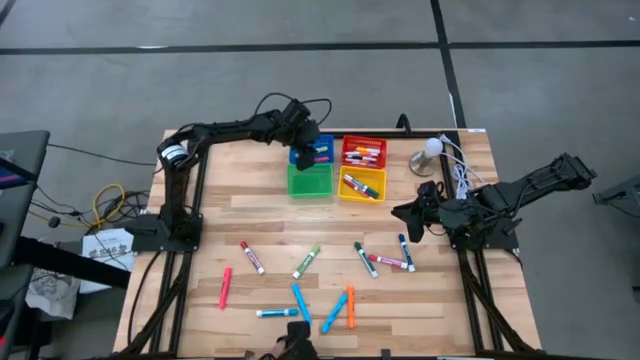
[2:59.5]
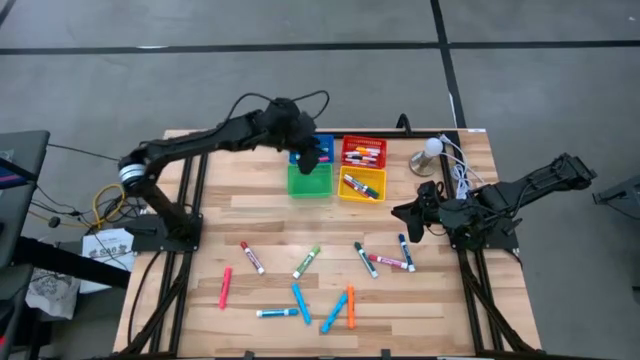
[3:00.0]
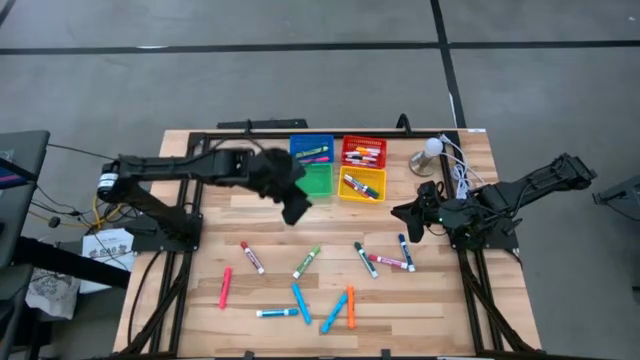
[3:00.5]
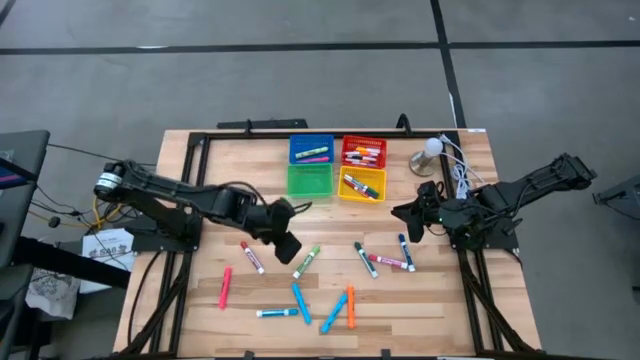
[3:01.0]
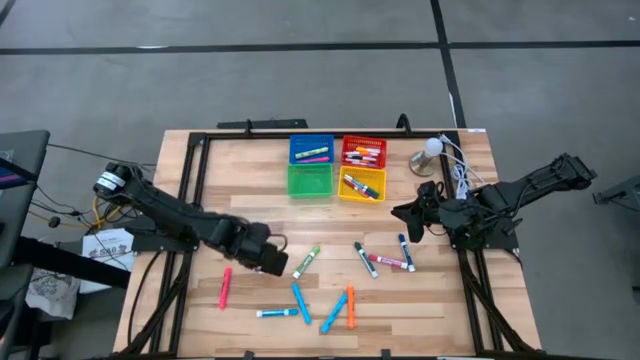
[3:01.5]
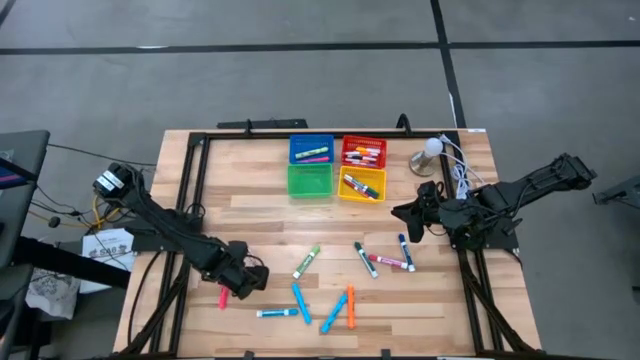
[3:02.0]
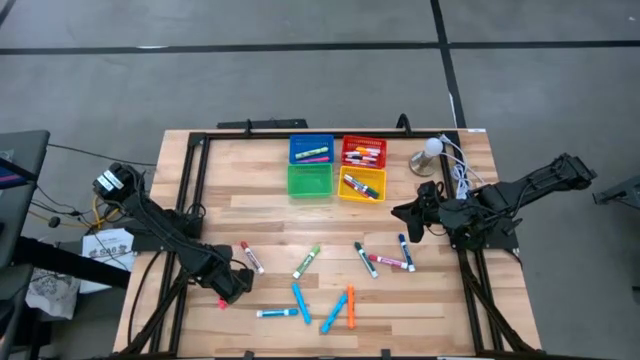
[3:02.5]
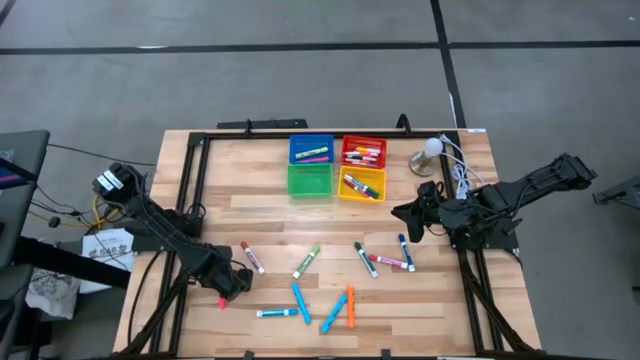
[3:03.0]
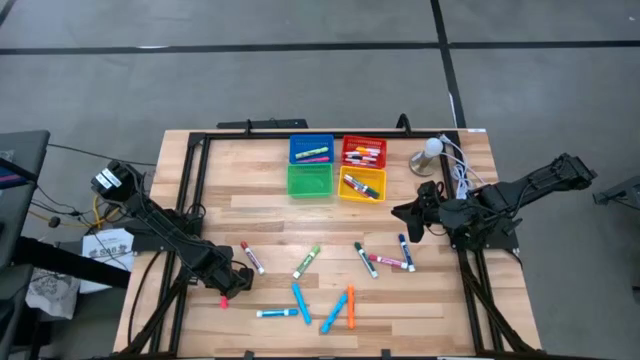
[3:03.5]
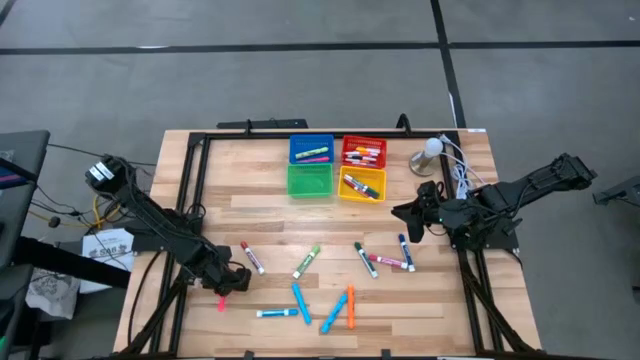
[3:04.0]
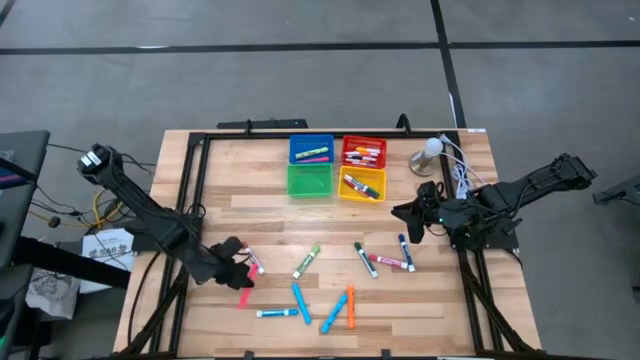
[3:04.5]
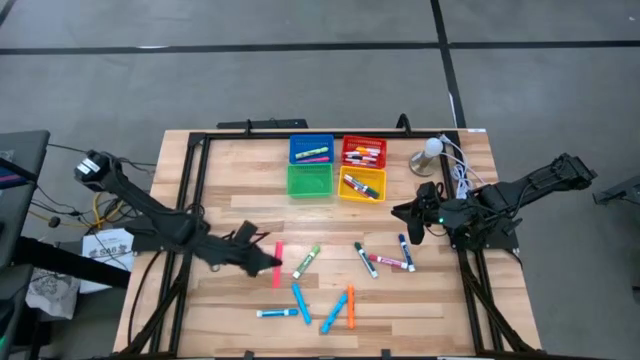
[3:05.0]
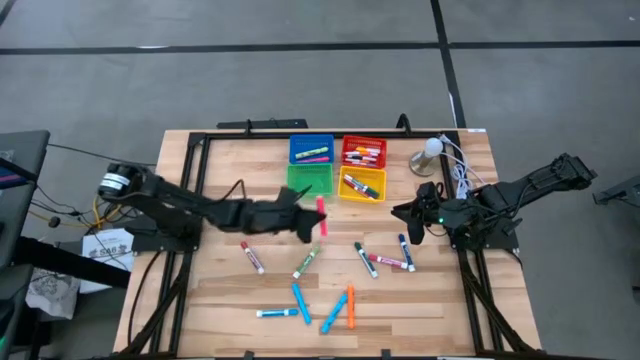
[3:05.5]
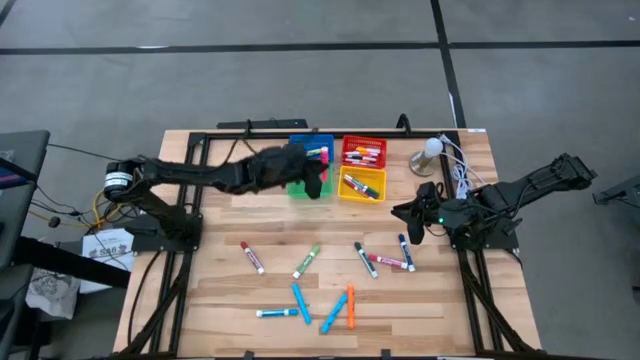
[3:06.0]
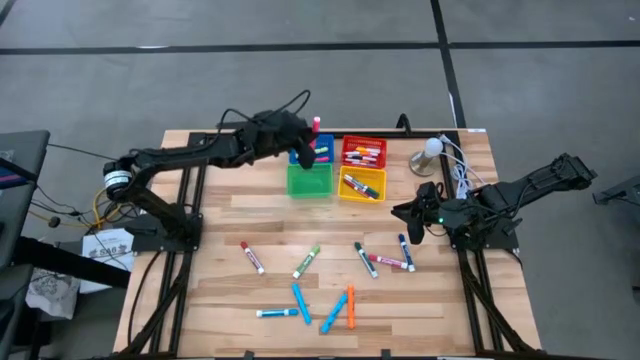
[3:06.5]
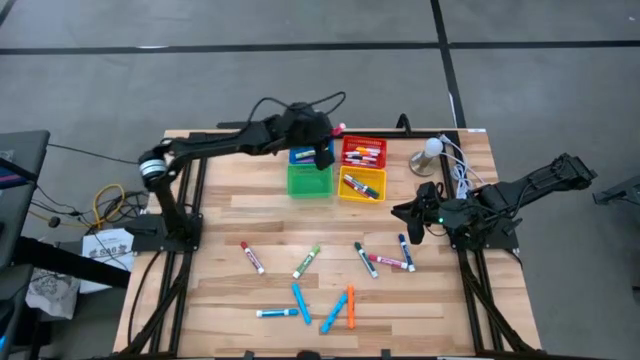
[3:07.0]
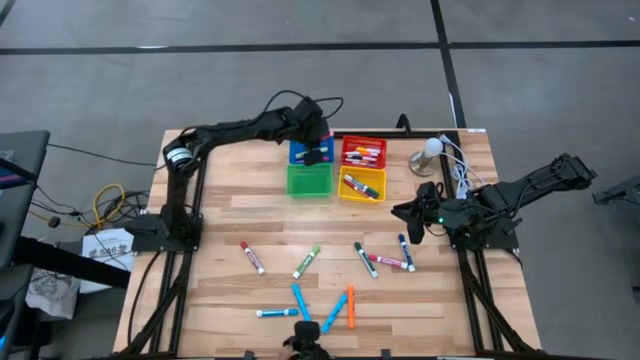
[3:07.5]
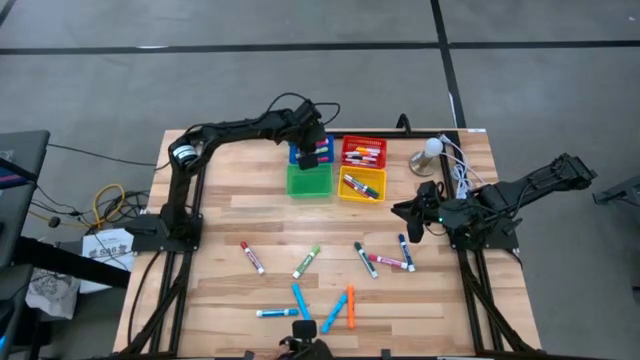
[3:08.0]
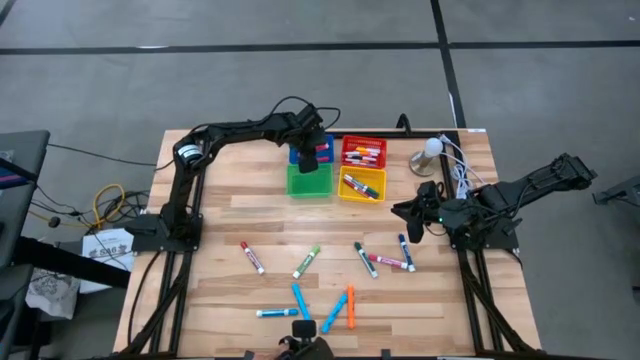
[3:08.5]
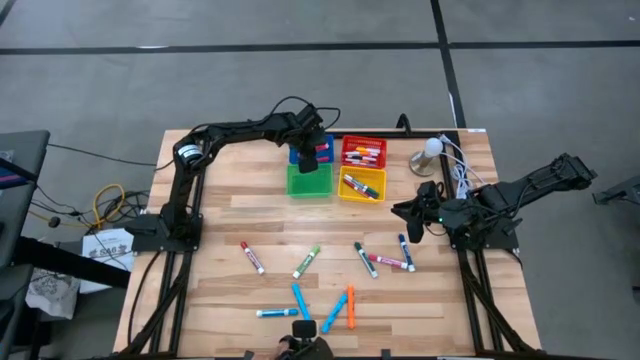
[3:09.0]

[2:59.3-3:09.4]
Task: Pick & Place Markers
Put the pink highlighter into the blue bin

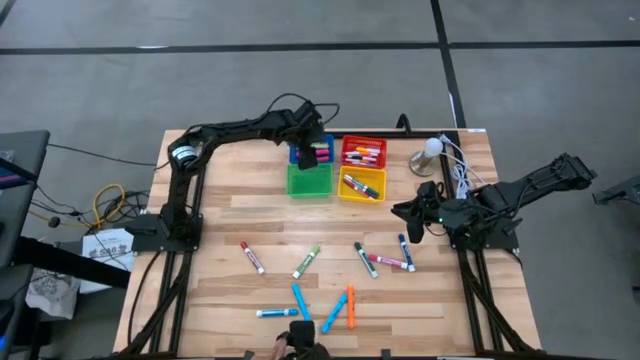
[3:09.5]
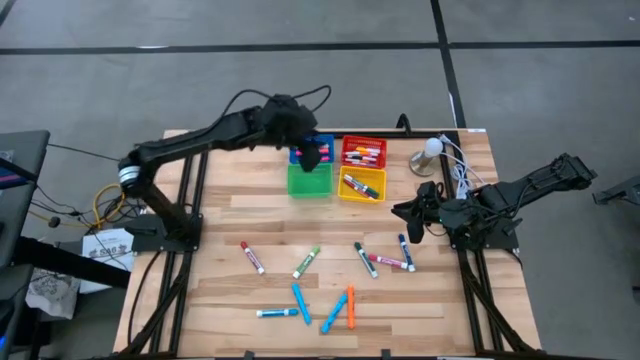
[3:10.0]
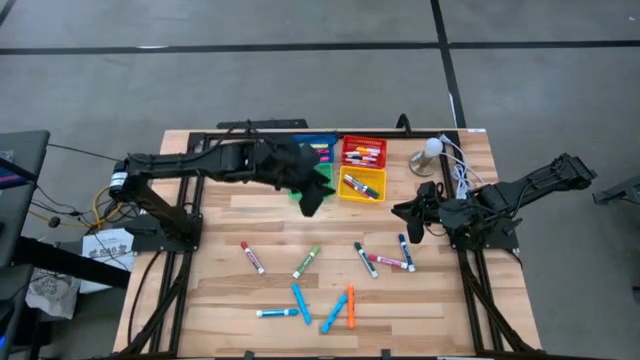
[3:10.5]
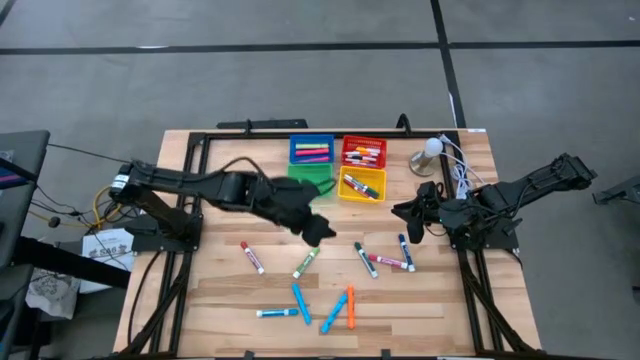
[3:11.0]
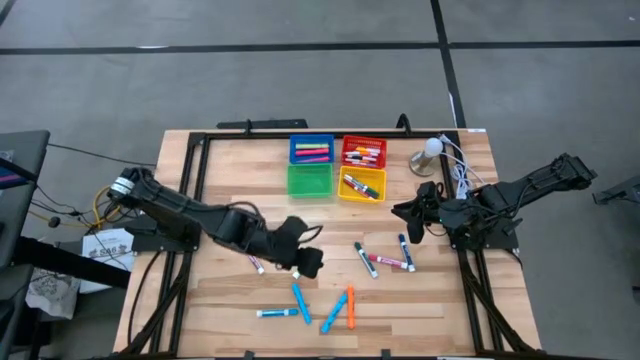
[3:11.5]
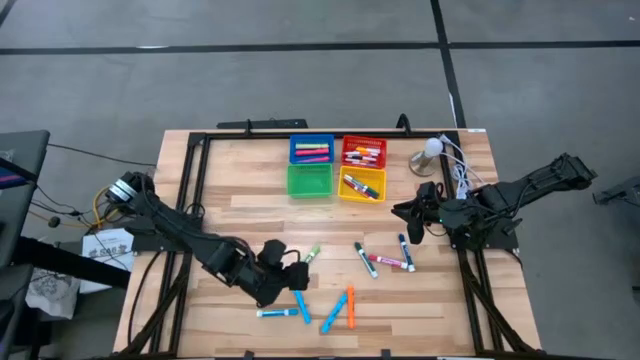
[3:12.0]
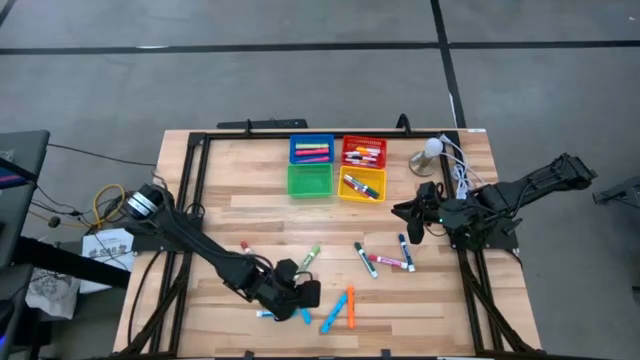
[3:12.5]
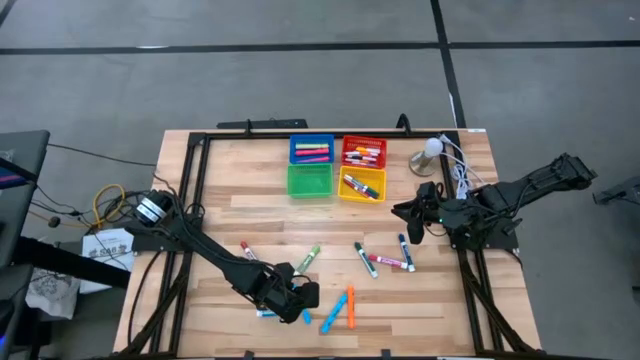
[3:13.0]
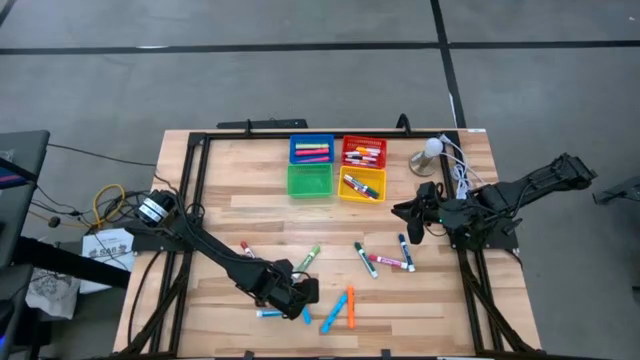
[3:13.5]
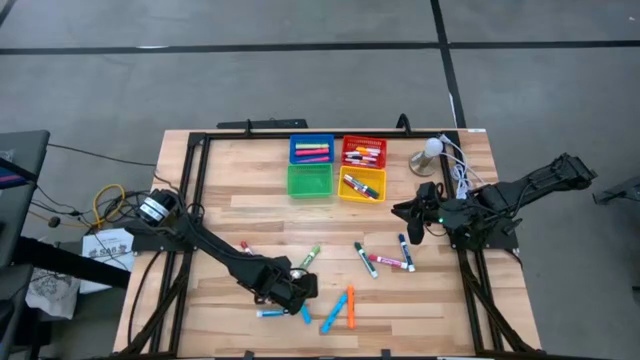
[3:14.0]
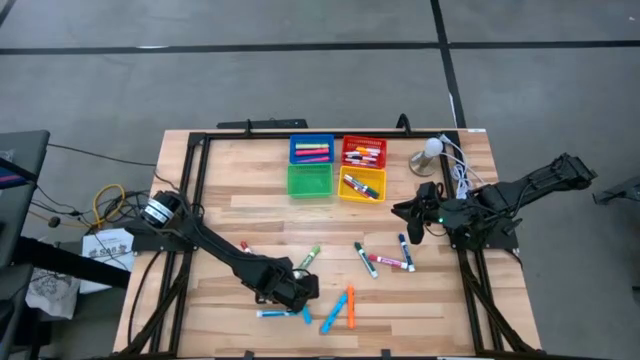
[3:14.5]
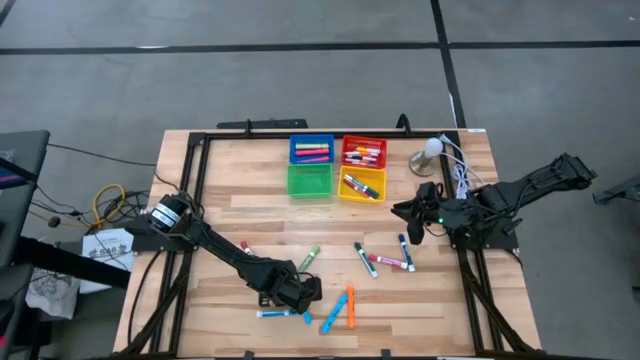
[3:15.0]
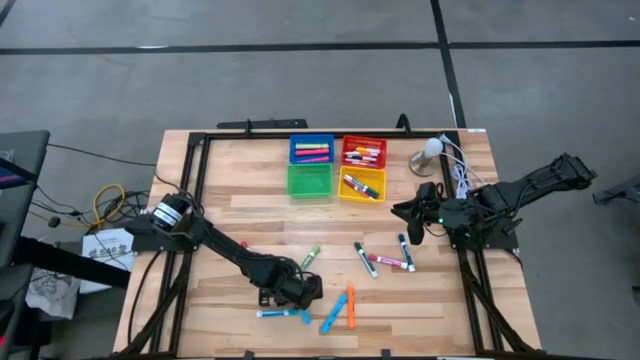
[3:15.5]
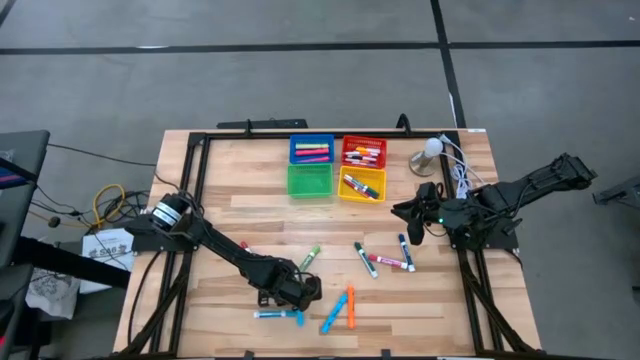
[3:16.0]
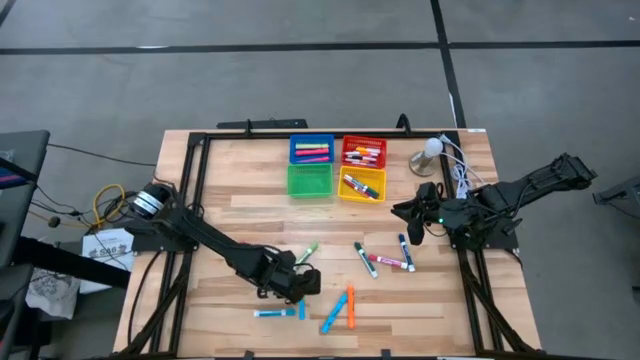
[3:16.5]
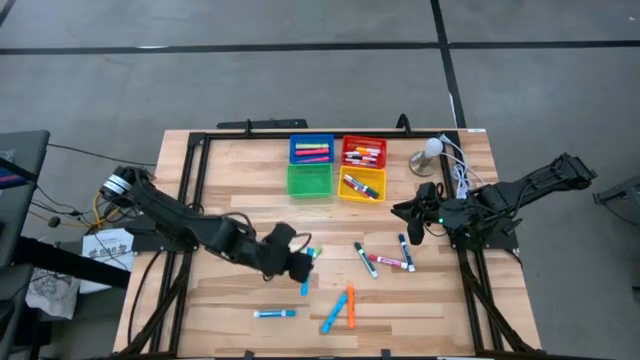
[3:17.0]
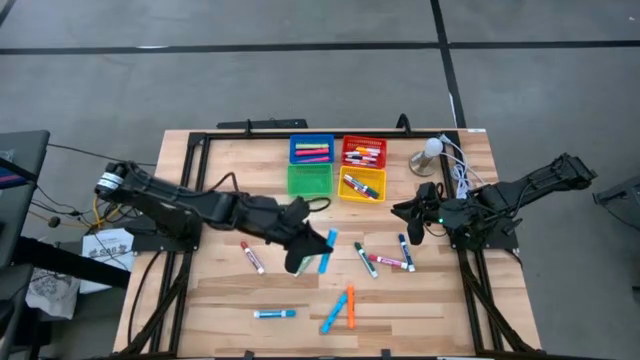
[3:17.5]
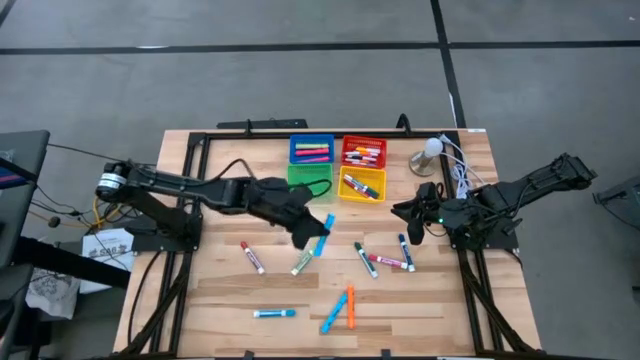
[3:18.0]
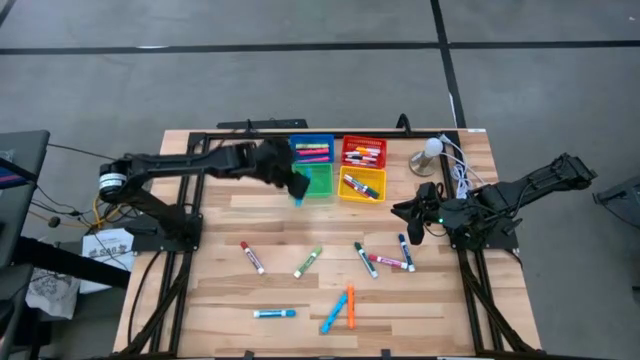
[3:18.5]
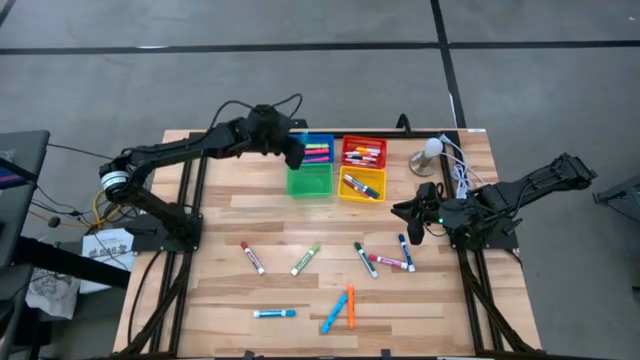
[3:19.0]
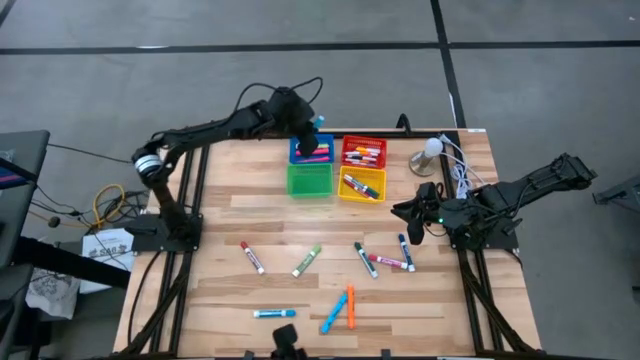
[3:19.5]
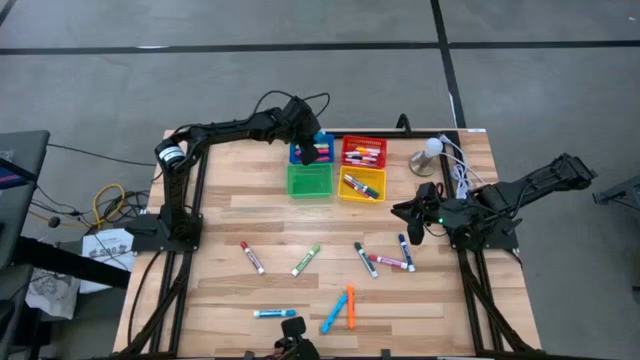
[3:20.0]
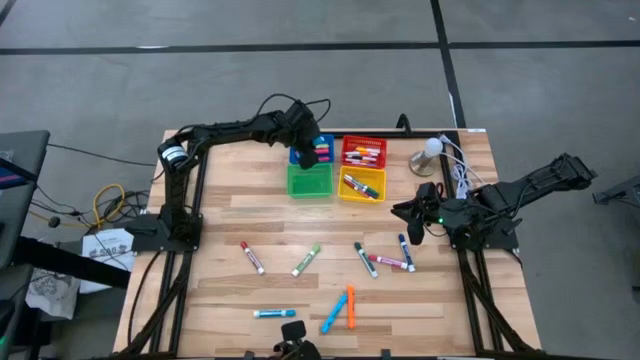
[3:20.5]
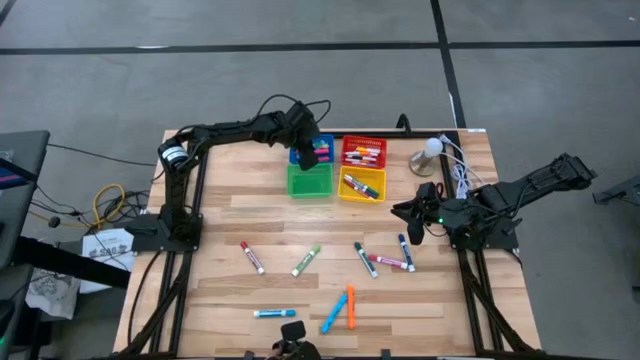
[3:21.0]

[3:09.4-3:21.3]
Put the left blue highlighter into the blue bin

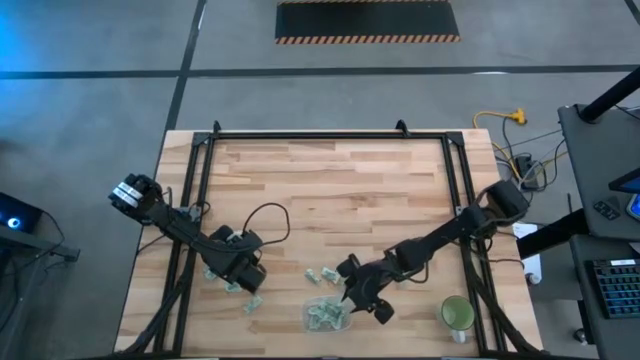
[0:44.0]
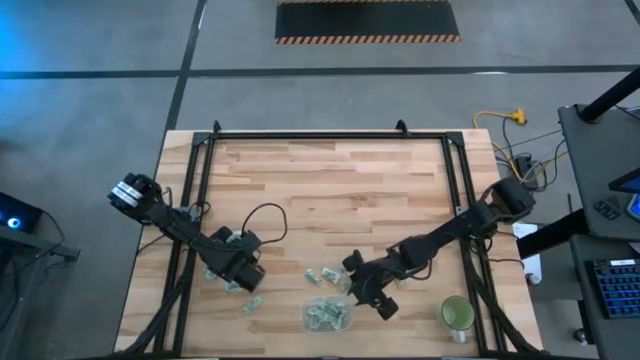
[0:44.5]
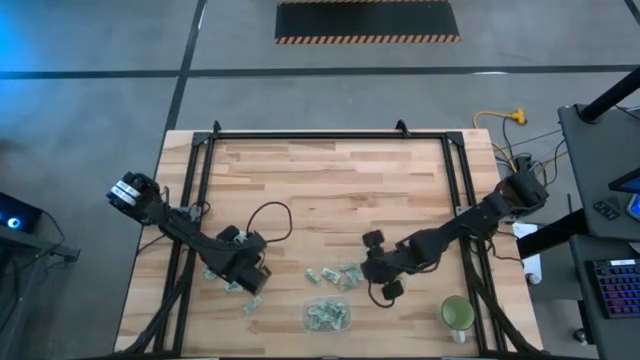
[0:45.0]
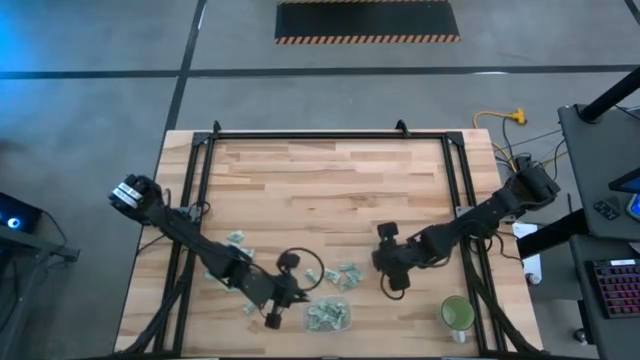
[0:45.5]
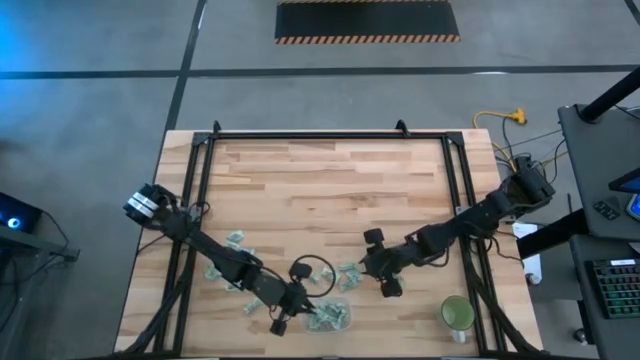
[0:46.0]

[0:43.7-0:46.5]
Task: Pick and place Stevia / Truvia into bins
Put the stevia packet into the transparent container
